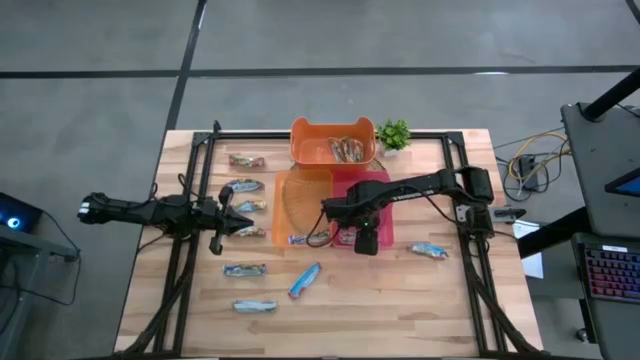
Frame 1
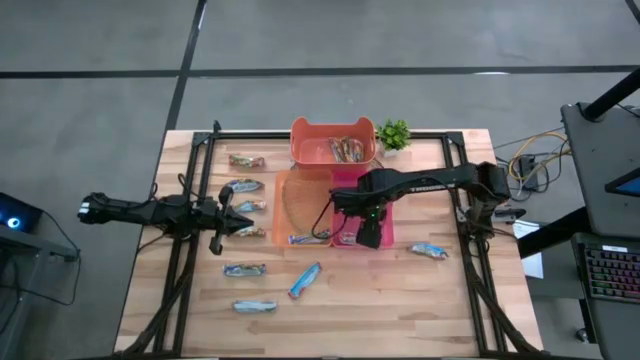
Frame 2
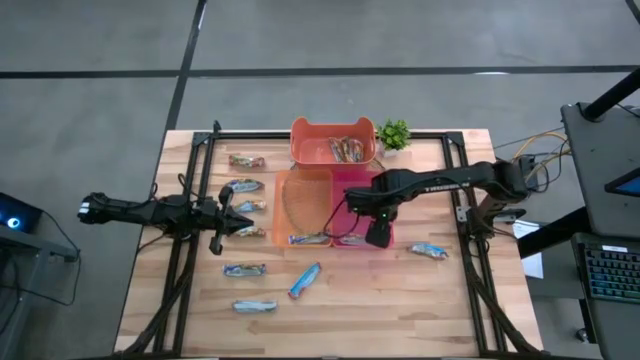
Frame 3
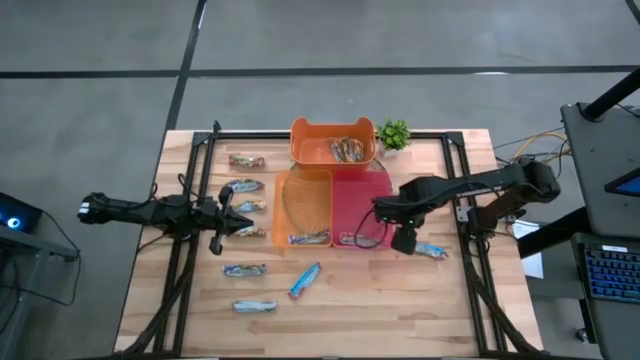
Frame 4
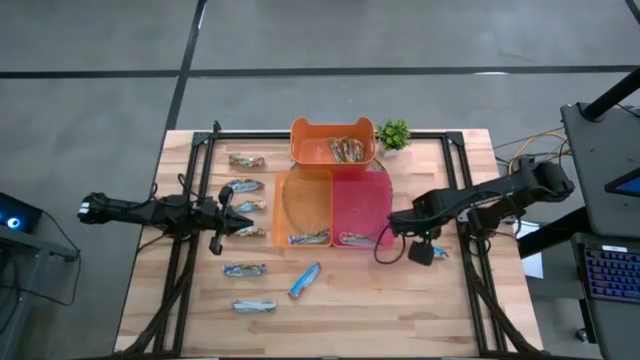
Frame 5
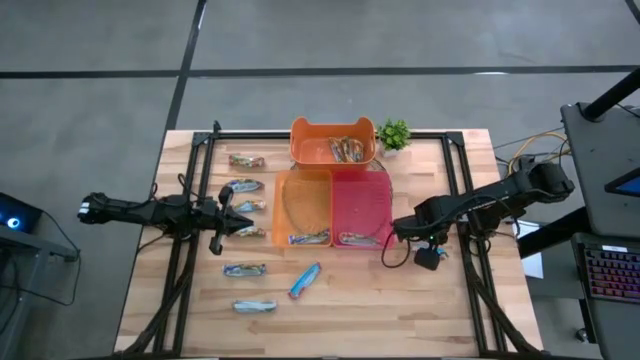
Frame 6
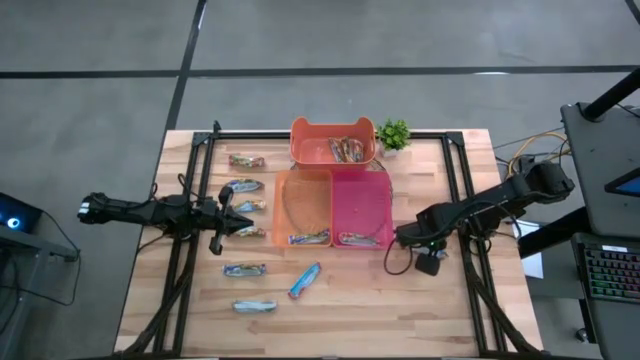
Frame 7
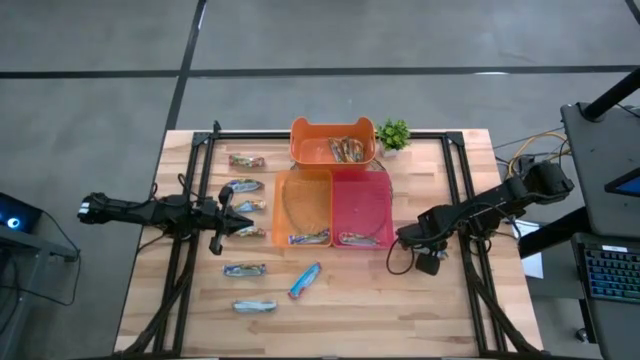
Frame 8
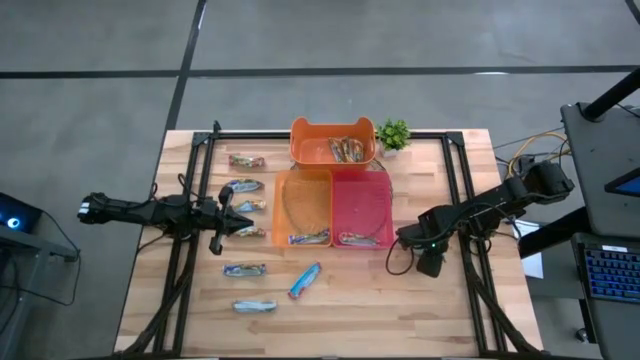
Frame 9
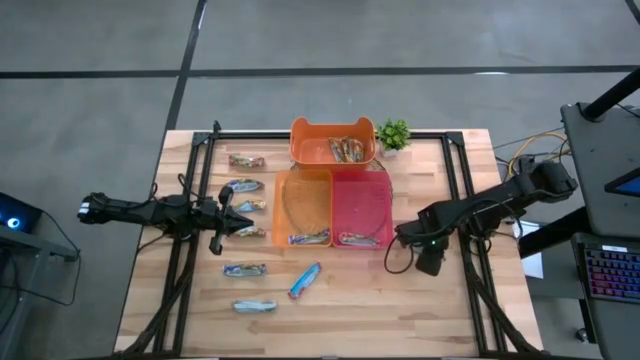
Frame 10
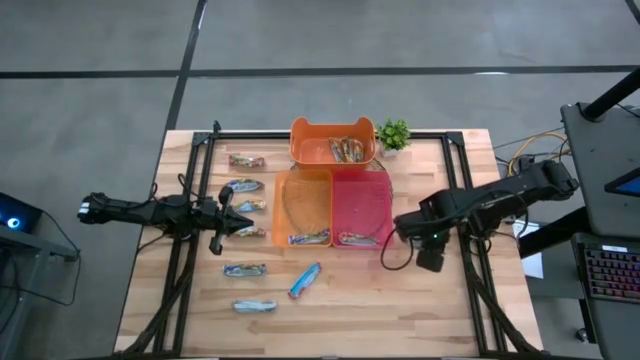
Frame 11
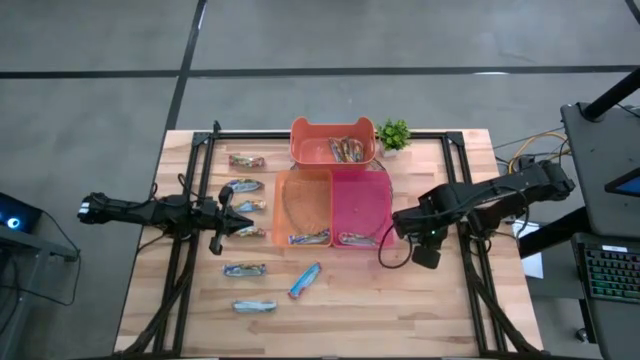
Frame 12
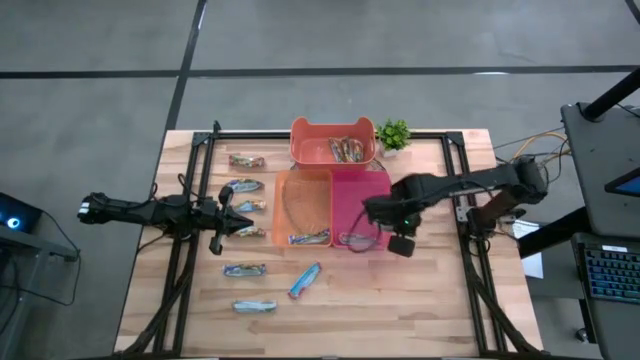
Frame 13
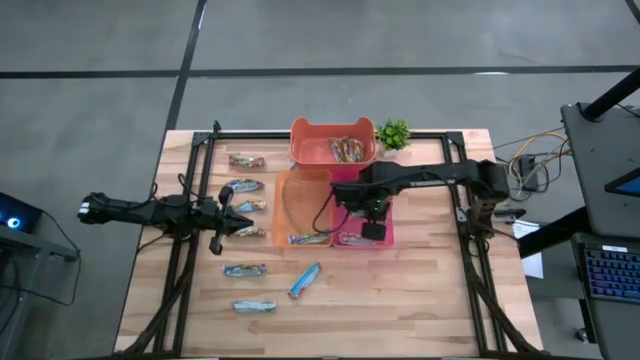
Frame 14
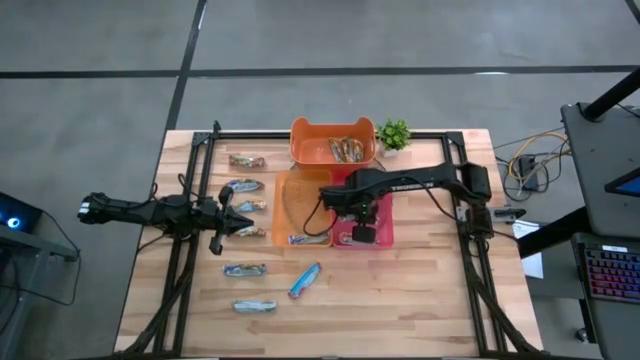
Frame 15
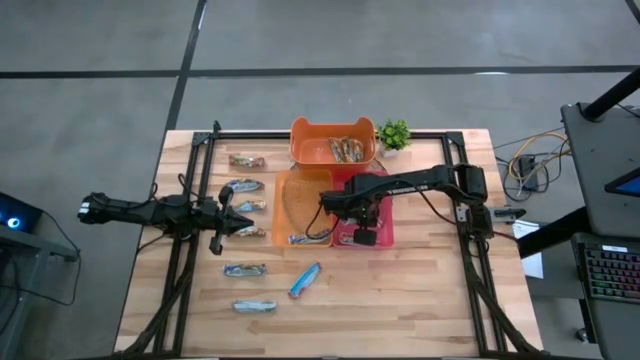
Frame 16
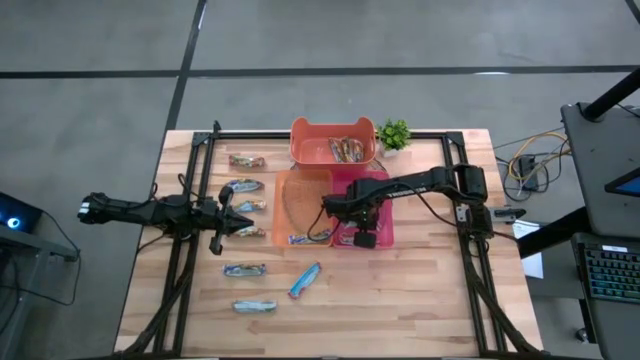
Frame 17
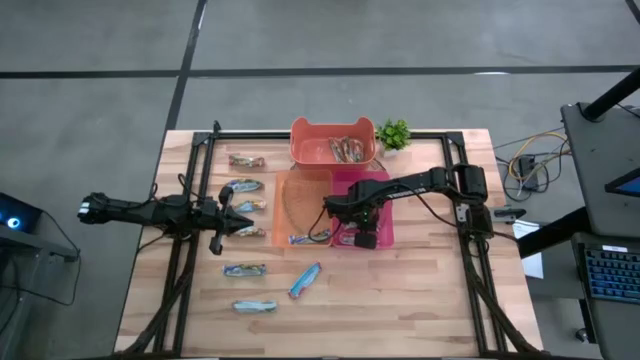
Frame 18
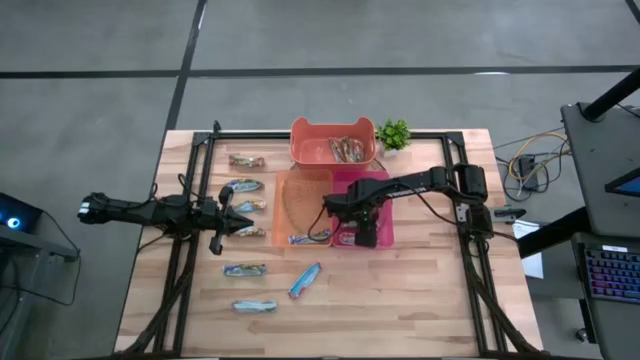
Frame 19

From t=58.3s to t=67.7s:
Task: Pick and place Granola Bars by type
Put the red granola bar into the pink bin

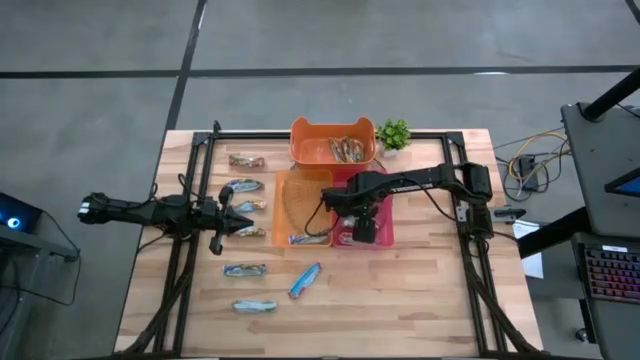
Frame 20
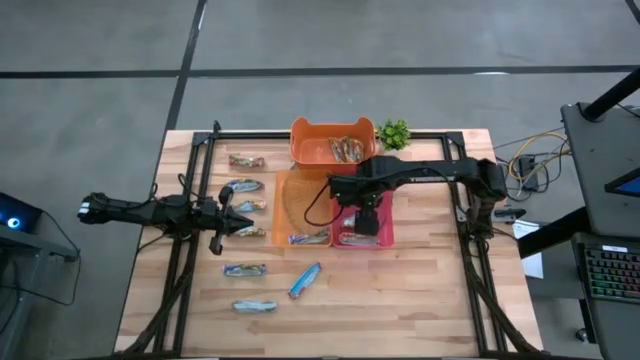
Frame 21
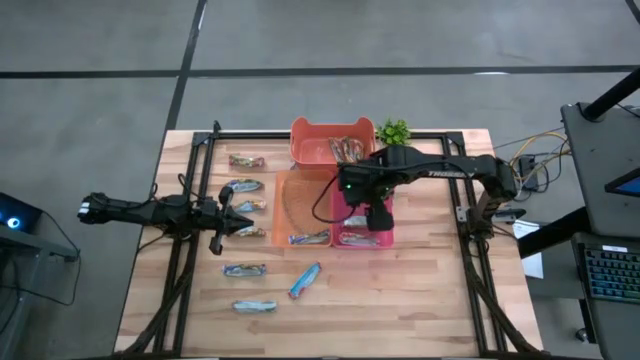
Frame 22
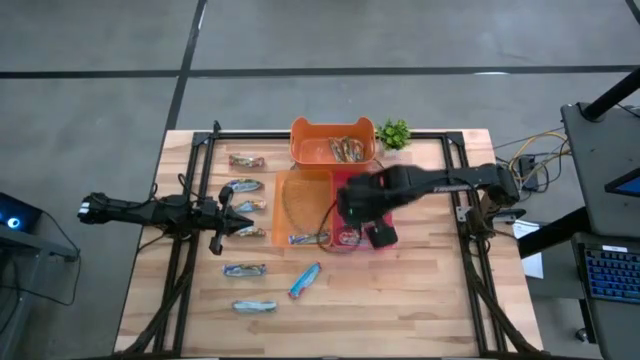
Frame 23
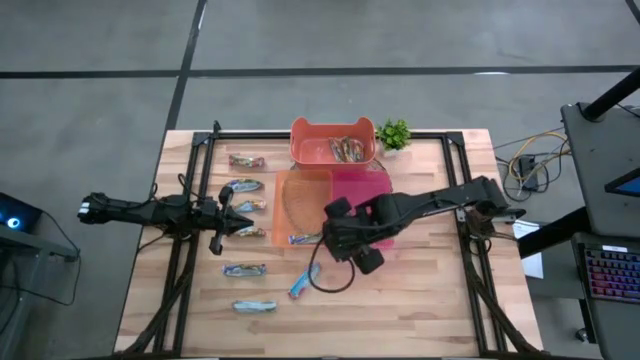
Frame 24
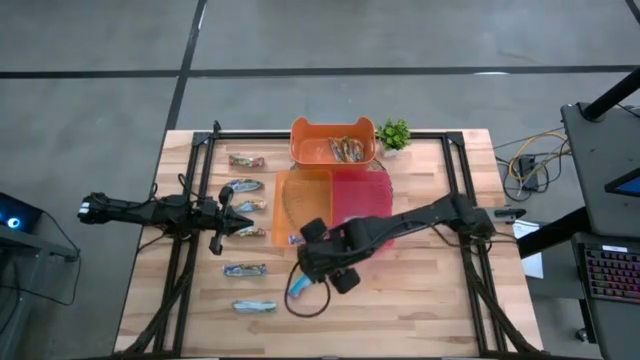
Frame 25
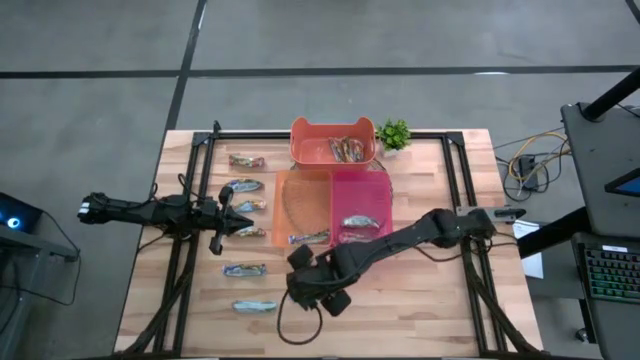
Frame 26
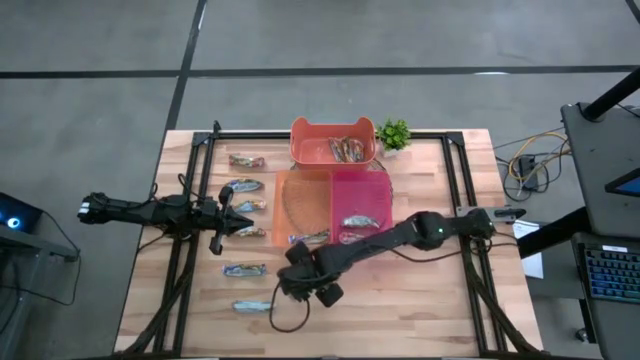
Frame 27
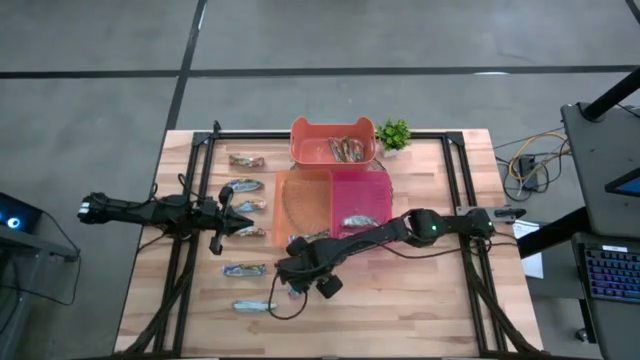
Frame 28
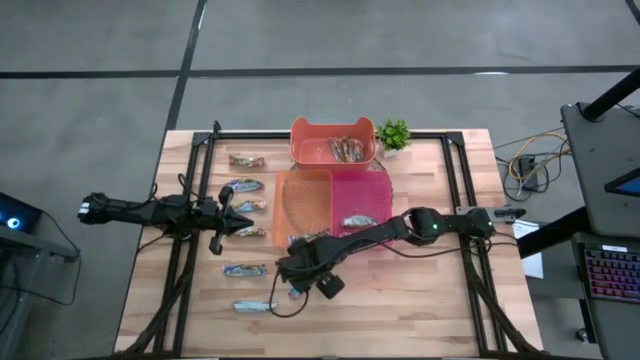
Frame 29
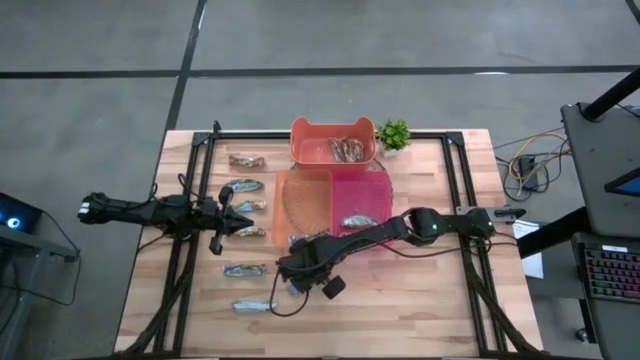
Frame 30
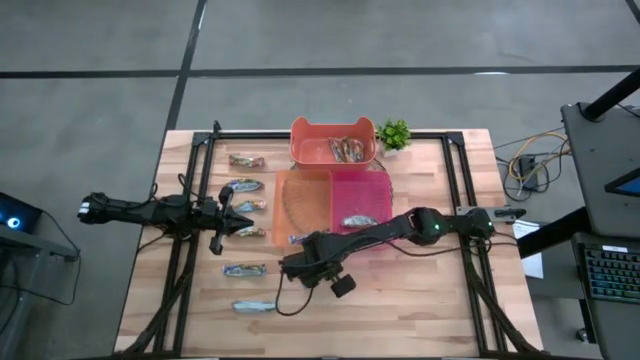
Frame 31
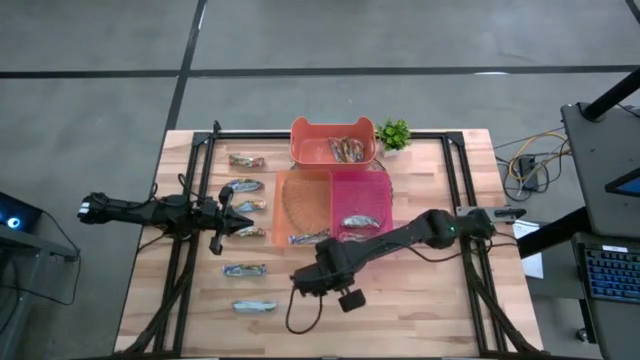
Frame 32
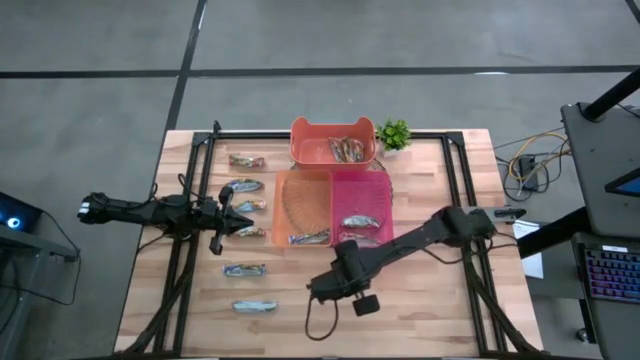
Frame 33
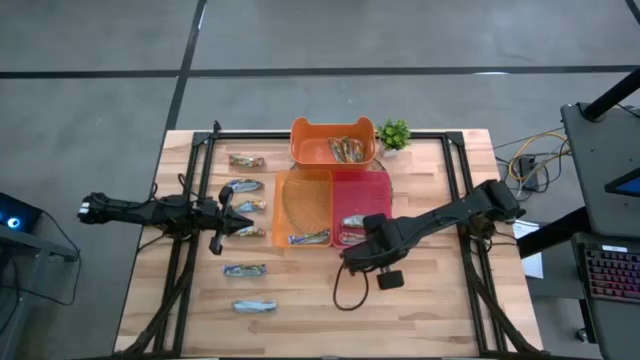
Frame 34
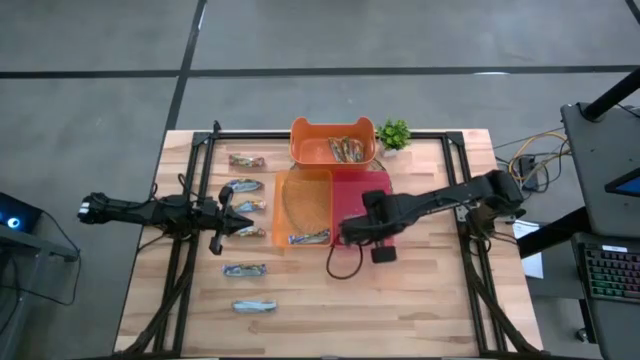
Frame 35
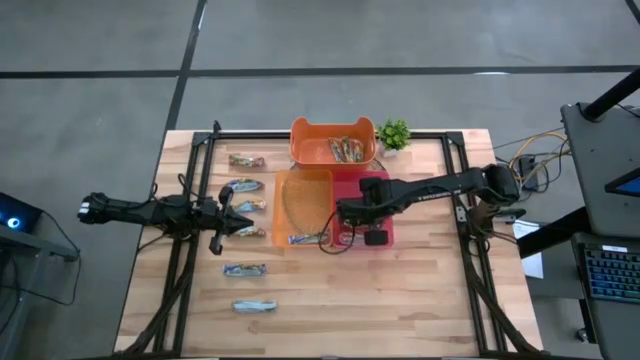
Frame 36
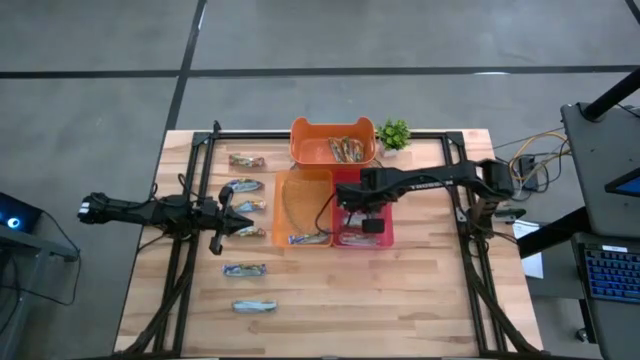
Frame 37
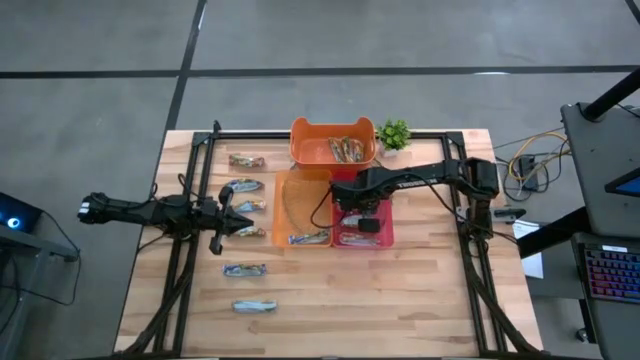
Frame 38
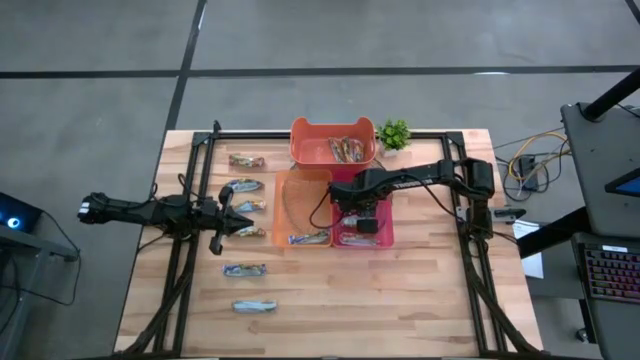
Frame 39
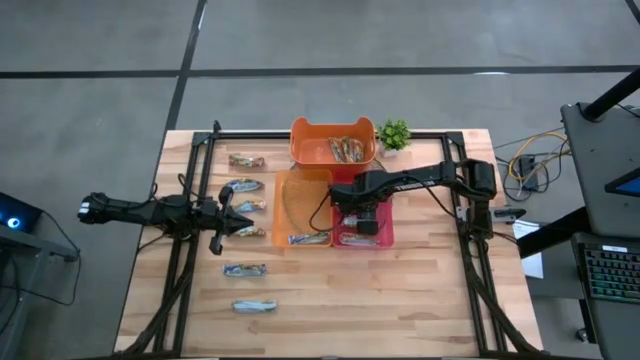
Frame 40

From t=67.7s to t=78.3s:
Put the red granola bar into the pink bin

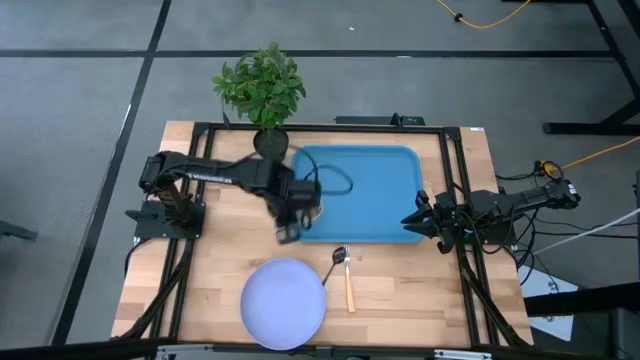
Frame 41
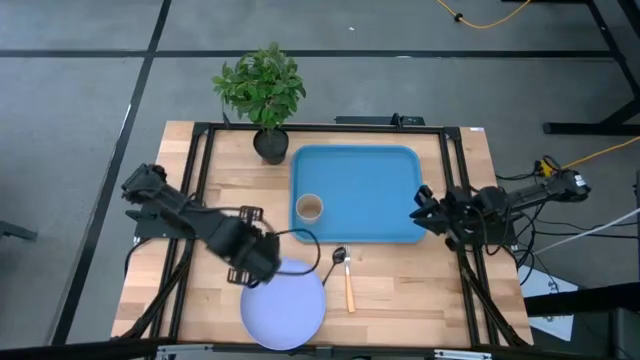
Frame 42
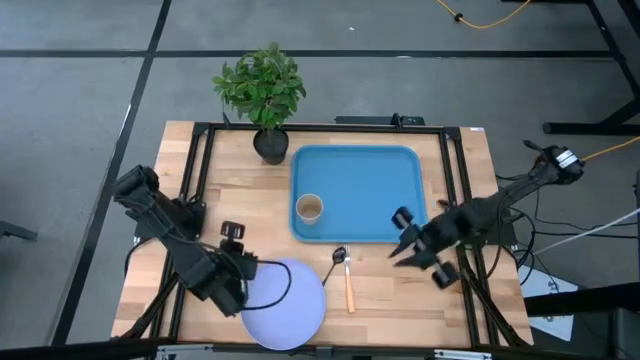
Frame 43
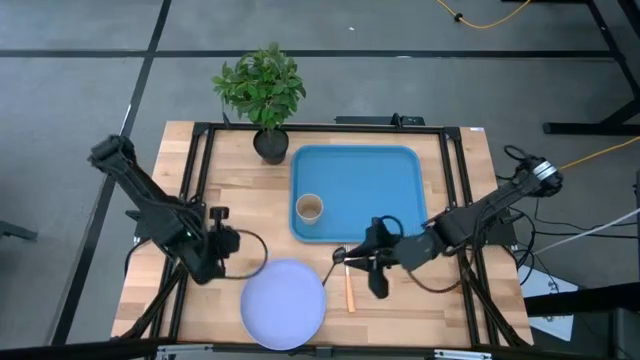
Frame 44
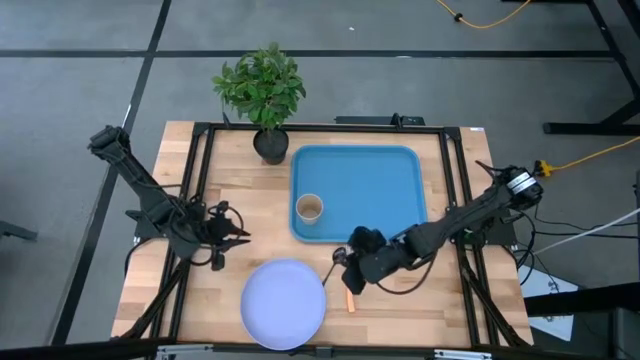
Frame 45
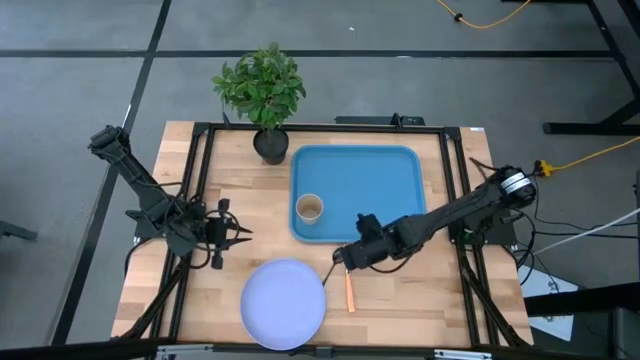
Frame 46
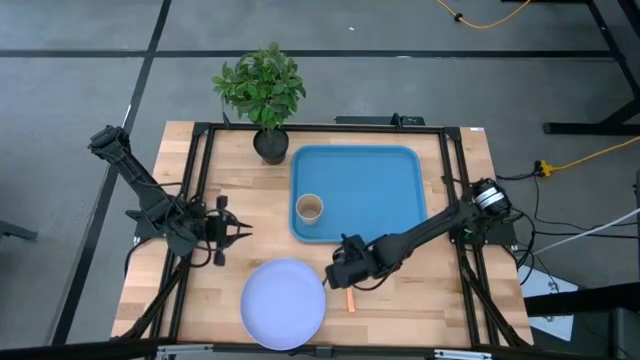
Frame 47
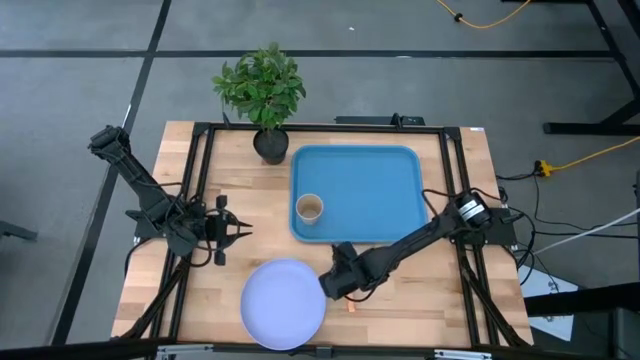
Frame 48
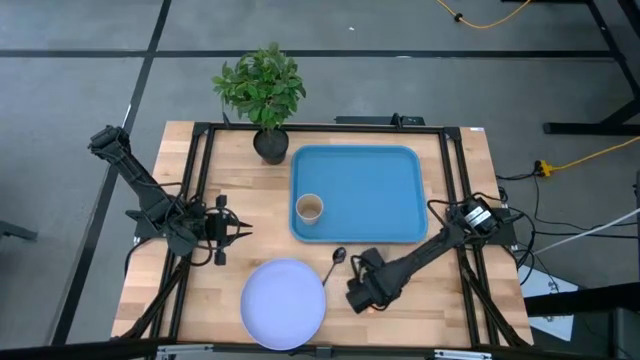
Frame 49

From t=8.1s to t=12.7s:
Task: Pick and place plate/cup/fork/spoon on tray
Adjust the fork
